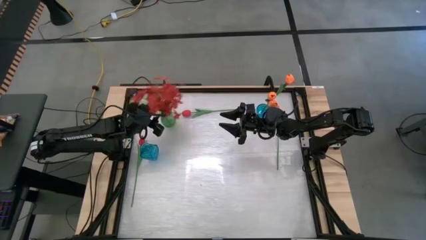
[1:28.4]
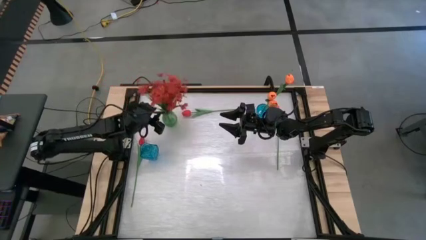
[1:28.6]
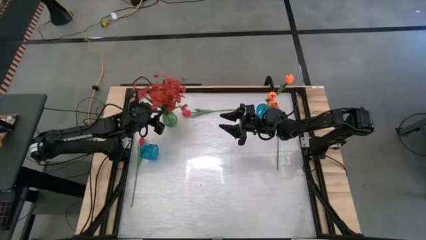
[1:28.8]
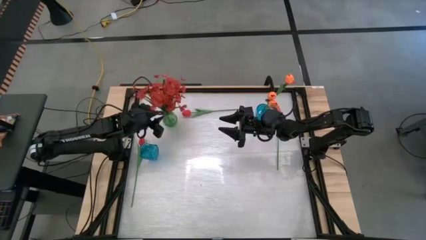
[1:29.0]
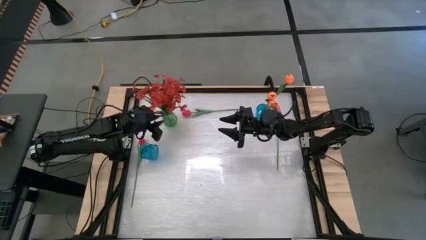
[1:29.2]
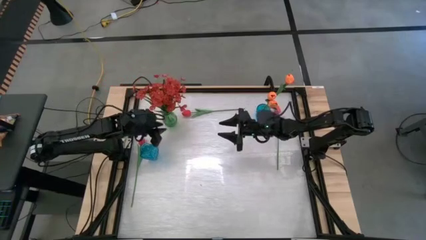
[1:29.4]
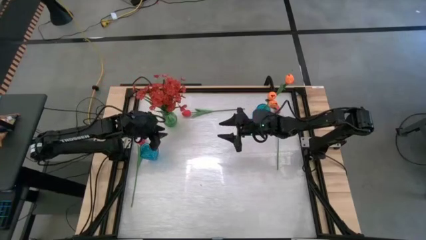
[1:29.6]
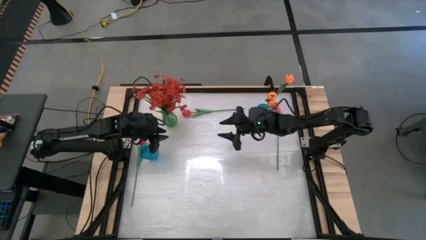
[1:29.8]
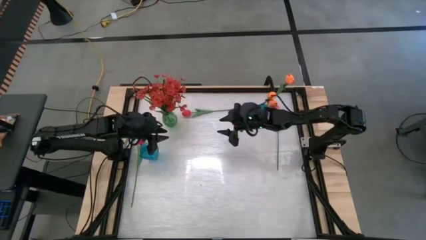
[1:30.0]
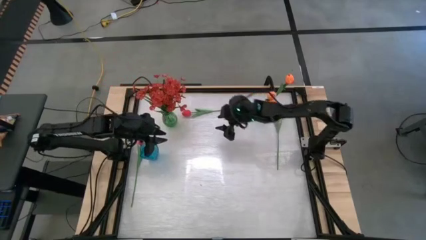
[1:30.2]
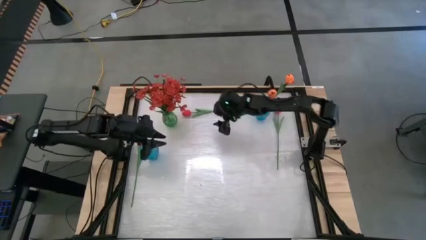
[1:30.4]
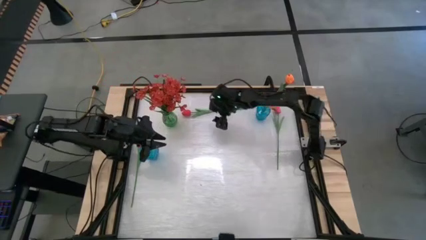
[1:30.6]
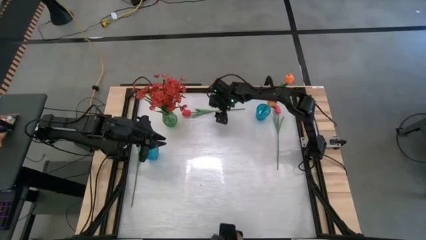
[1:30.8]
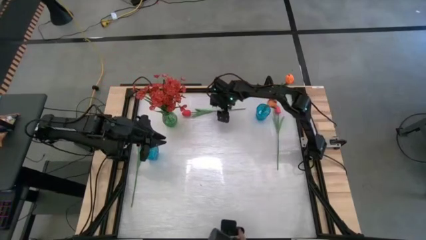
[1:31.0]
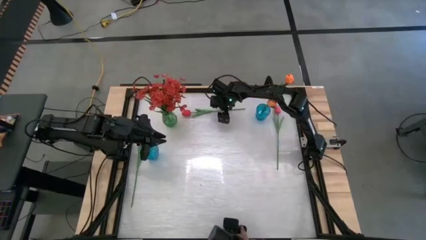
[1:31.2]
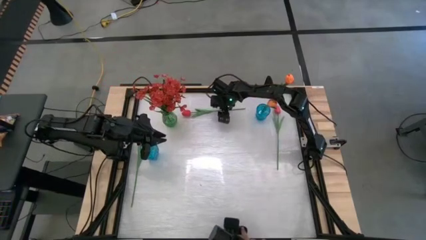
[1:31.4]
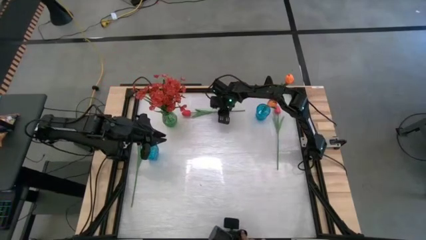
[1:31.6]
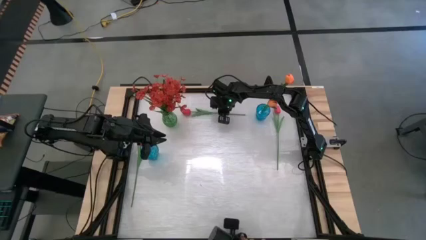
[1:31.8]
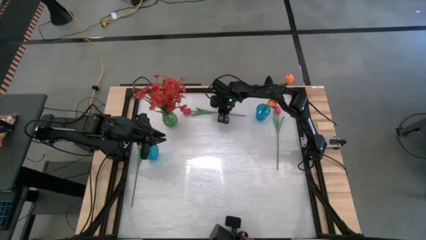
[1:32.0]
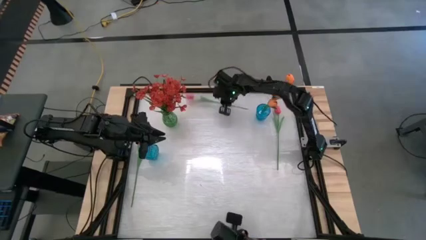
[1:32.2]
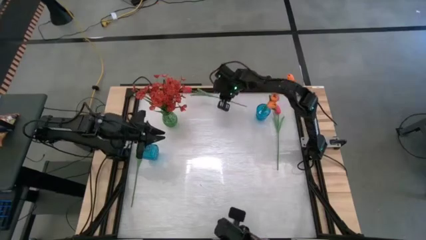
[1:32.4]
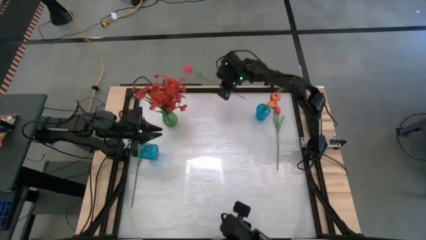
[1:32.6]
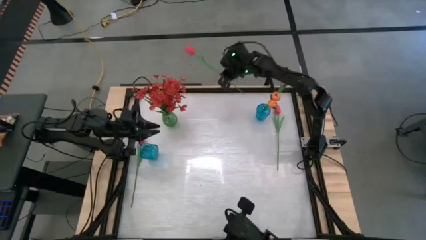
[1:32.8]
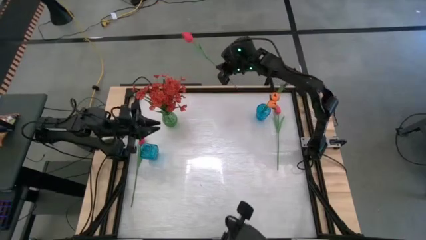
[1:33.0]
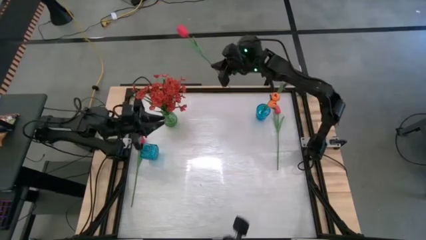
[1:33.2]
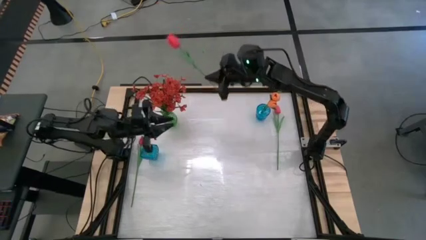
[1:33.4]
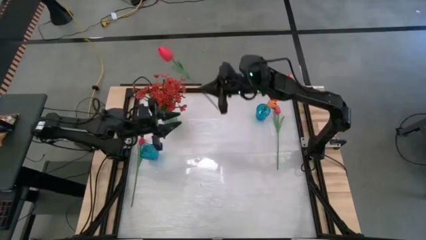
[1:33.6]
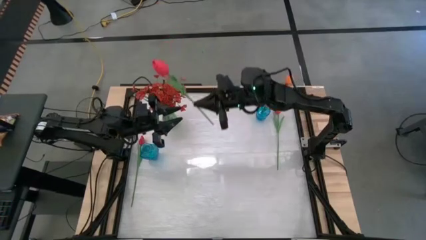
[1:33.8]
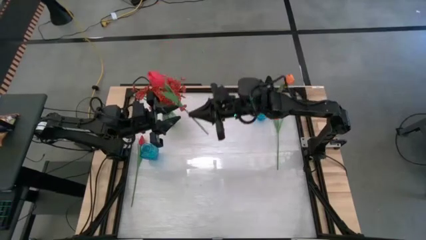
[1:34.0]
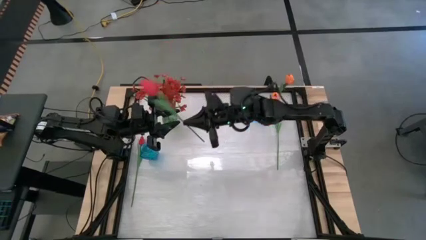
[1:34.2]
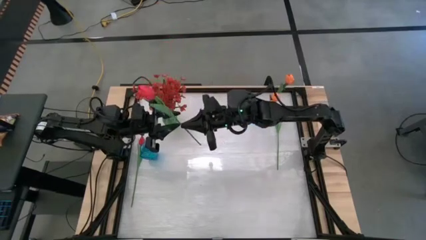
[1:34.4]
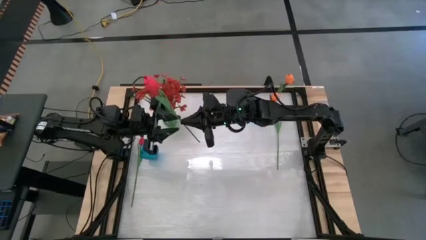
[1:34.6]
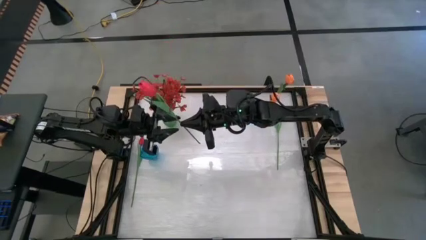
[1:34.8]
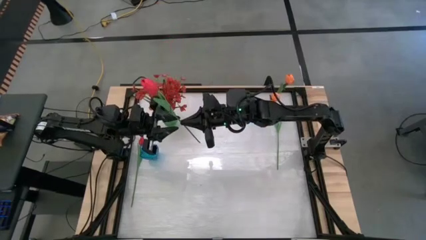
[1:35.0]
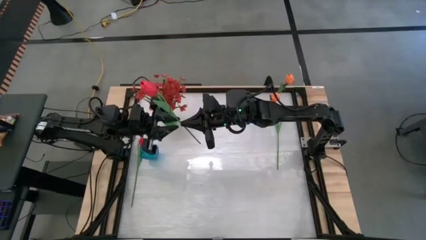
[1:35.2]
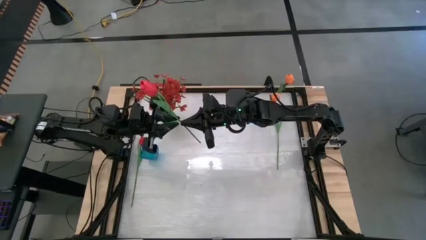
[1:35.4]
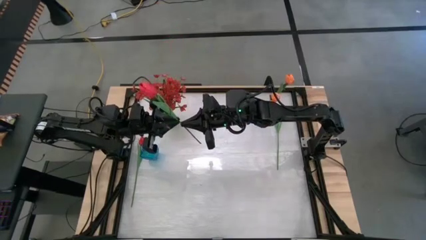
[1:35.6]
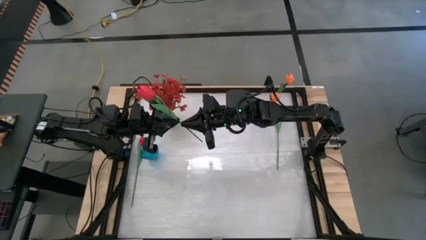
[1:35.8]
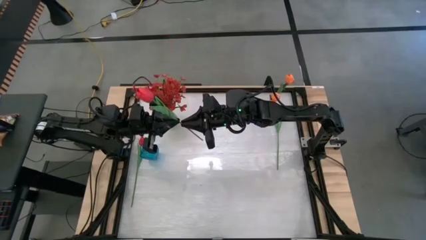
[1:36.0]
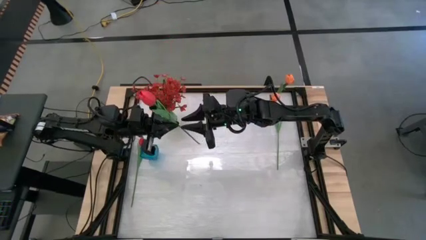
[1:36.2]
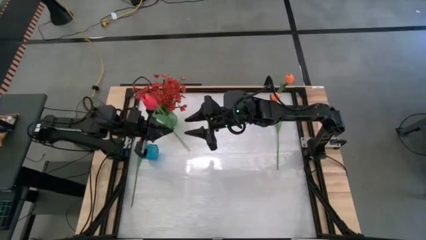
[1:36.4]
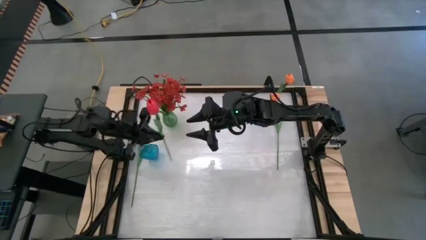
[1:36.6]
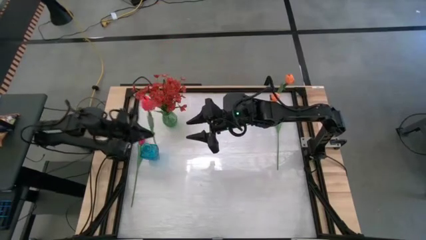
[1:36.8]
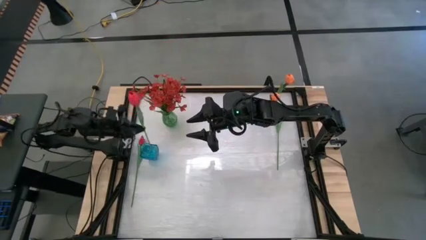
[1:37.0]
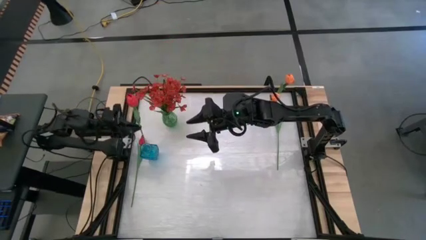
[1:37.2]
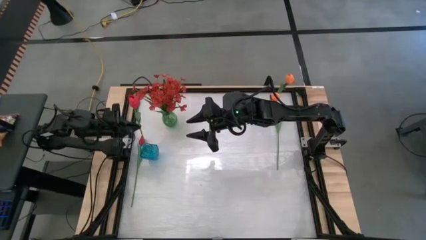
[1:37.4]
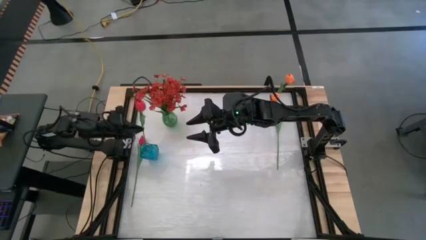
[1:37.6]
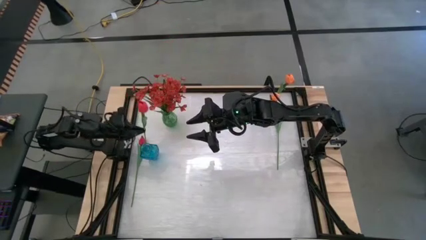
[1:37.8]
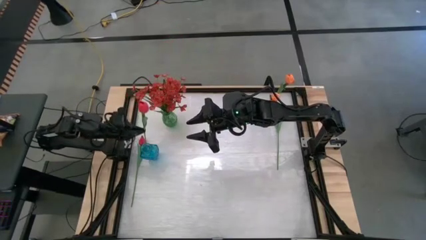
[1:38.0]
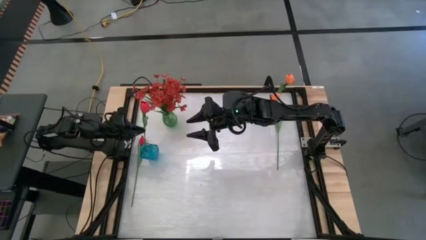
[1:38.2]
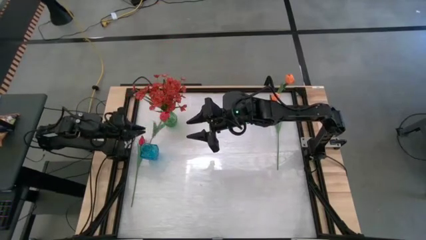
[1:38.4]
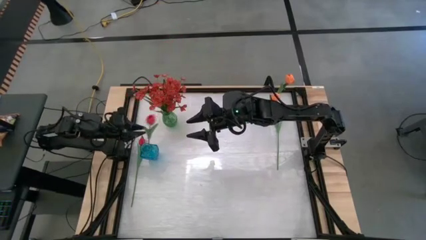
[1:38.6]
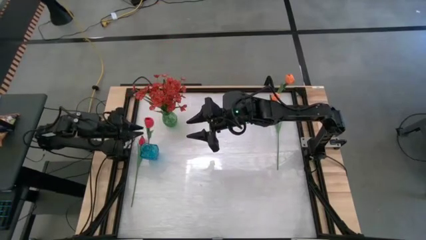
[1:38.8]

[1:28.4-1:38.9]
Task: Sort flowers into vase by color
Put the top left red tulip into the left blue vase

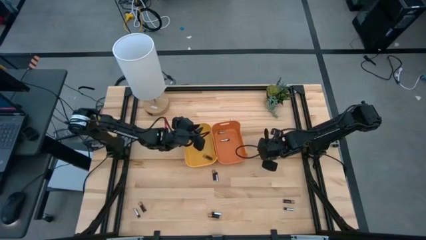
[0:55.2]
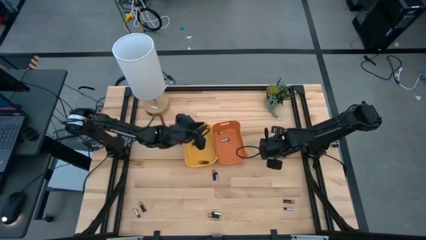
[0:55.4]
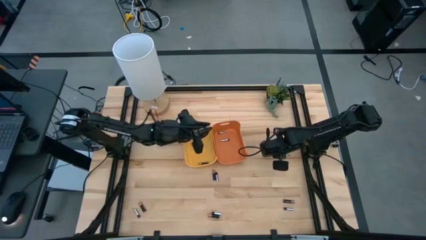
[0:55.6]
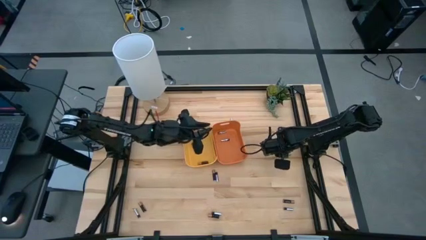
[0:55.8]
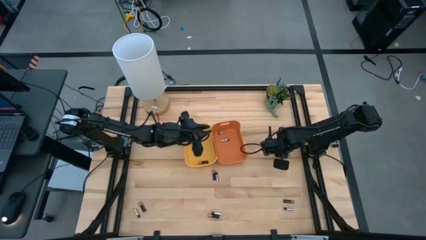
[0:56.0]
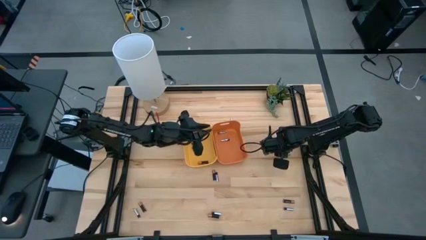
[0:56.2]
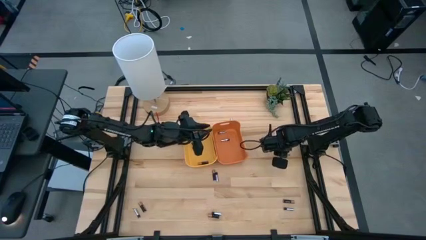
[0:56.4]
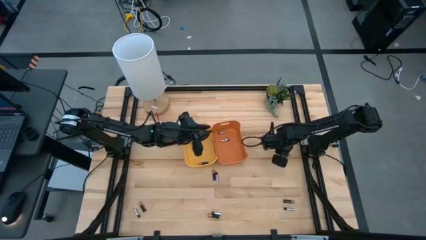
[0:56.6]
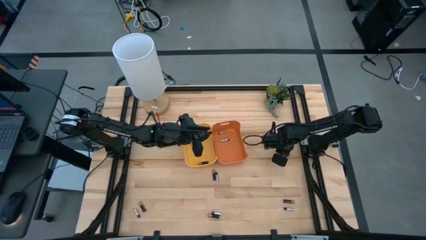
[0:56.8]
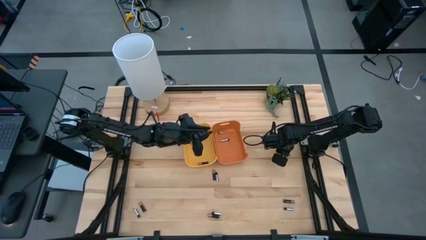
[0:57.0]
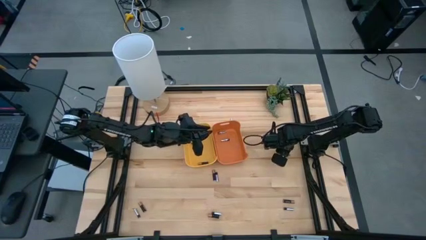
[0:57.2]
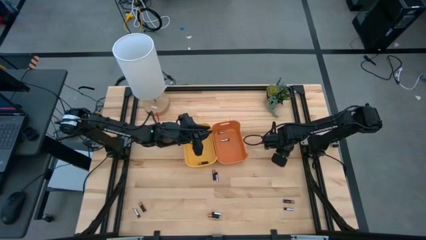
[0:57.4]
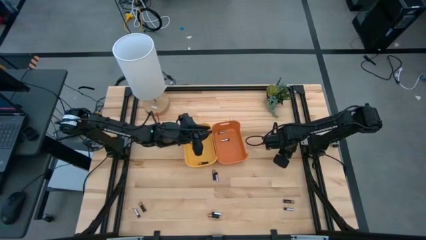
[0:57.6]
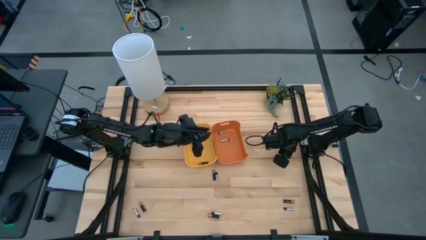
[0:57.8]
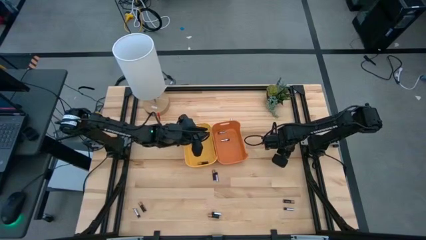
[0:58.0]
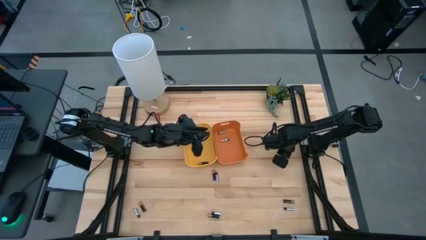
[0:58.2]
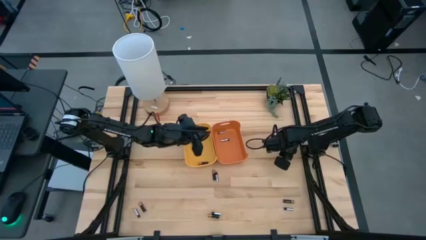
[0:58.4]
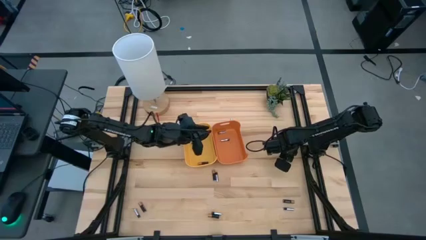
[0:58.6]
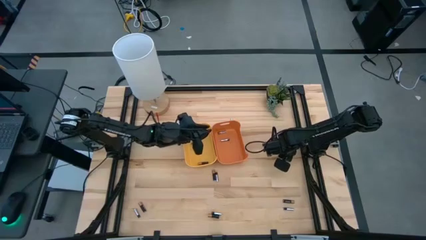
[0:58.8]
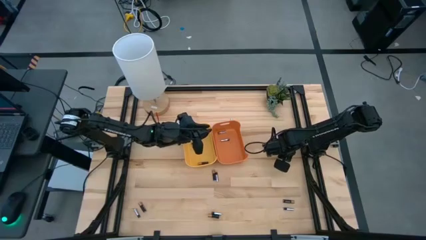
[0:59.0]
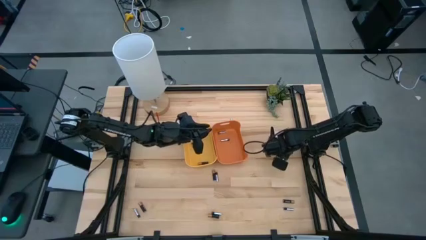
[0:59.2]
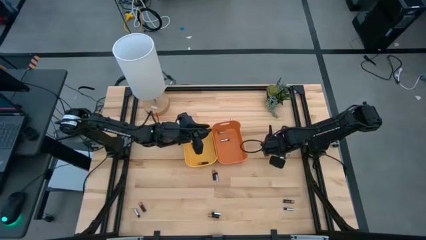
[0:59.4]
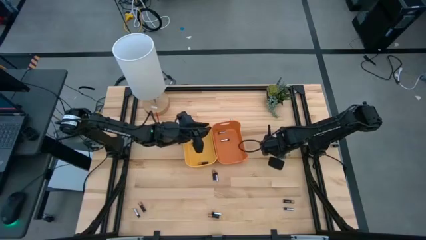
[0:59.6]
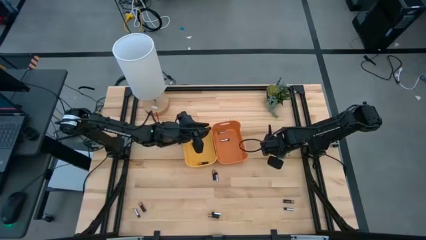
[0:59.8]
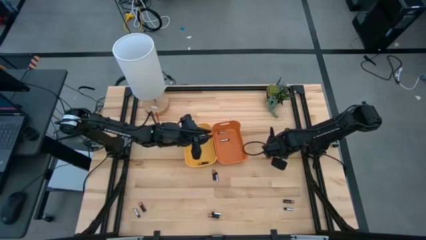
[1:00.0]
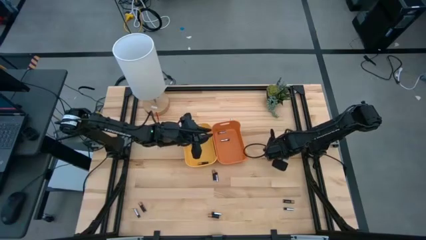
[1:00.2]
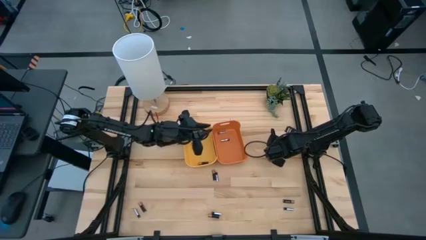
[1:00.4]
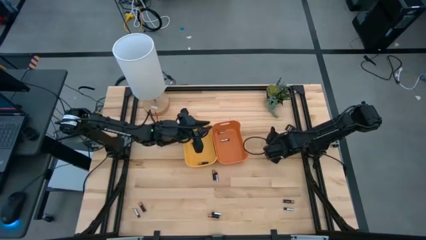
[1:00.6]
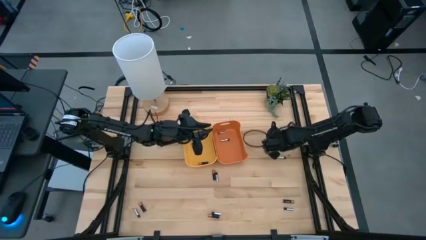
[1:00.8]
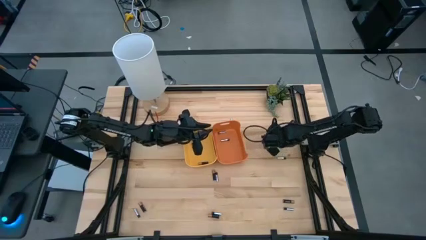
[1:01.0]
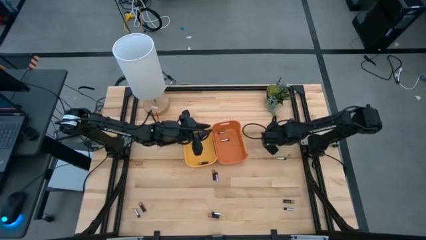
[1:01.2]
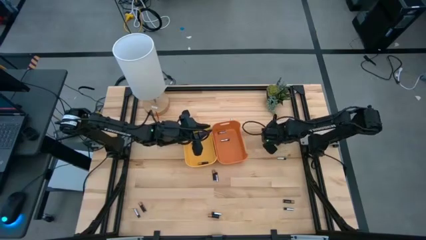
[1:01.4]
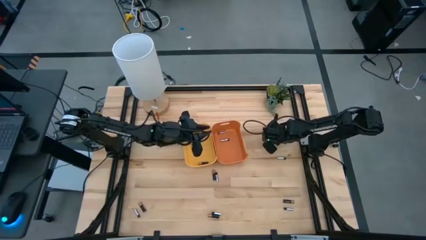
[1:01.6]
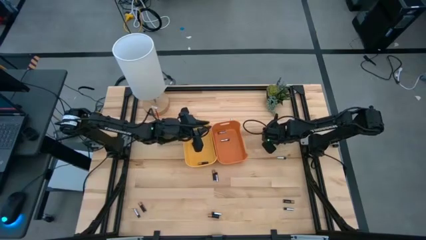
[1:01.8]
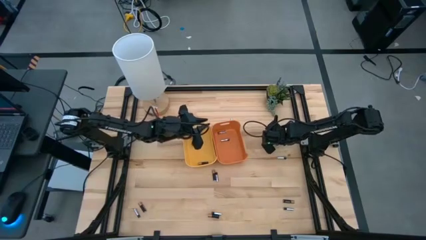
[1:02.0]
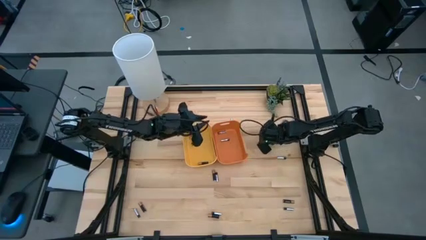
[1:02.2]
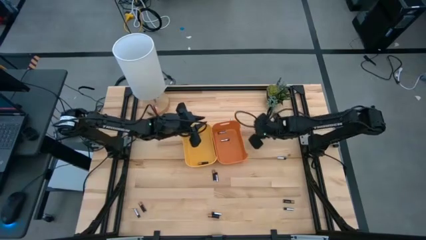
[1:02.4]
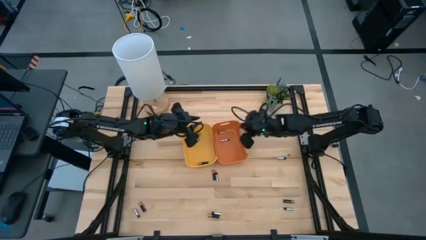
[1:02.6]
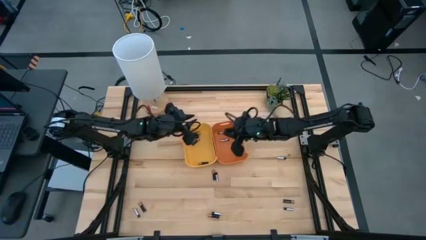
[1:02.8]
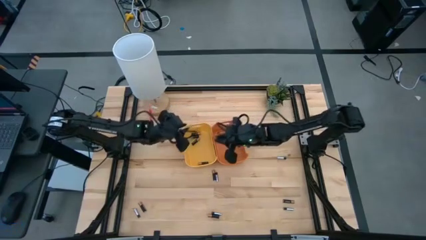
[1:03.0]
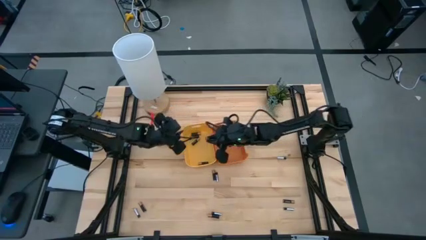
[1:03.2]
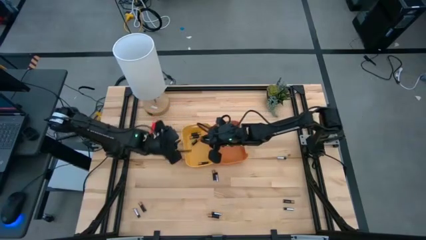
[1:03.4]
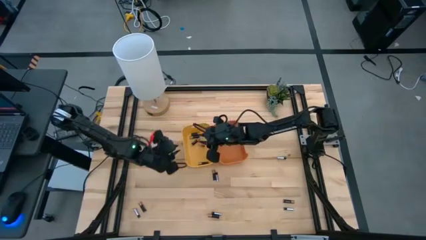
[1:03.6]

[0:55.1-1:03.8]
Task: Sort batteries
Put the middle right black battery into the yellow bin
